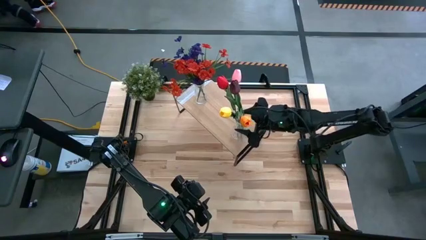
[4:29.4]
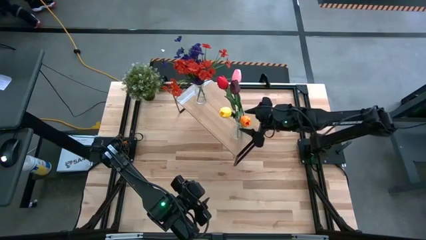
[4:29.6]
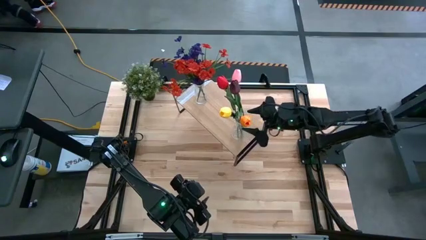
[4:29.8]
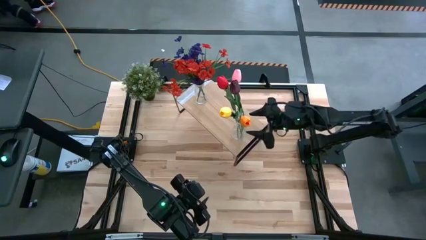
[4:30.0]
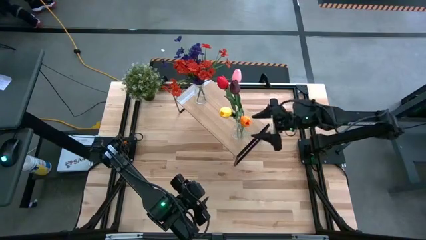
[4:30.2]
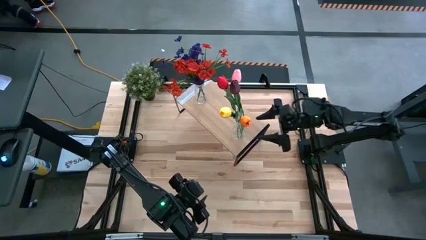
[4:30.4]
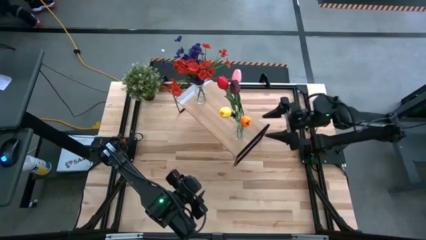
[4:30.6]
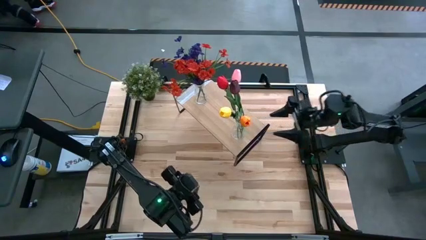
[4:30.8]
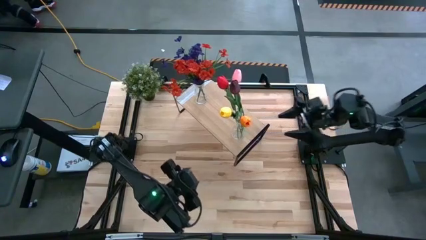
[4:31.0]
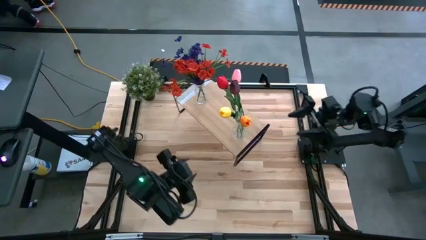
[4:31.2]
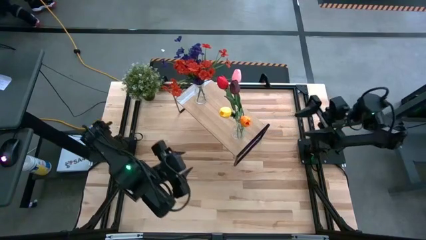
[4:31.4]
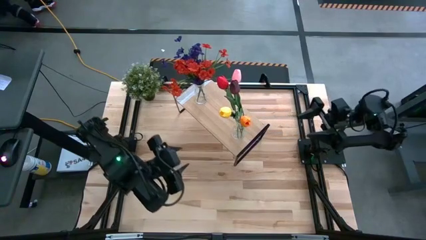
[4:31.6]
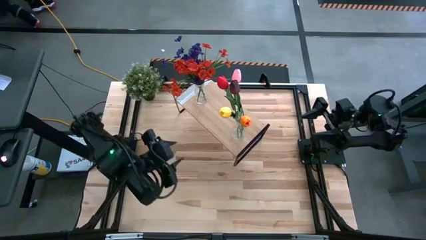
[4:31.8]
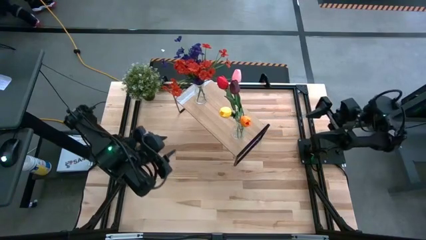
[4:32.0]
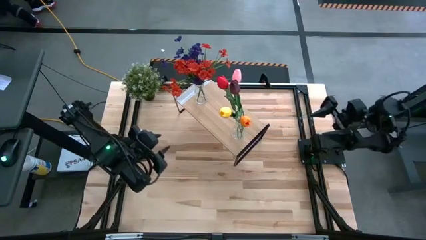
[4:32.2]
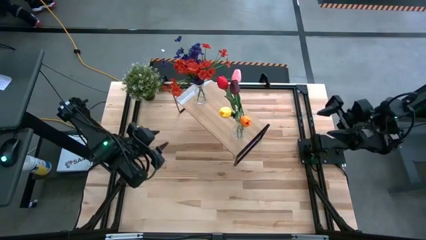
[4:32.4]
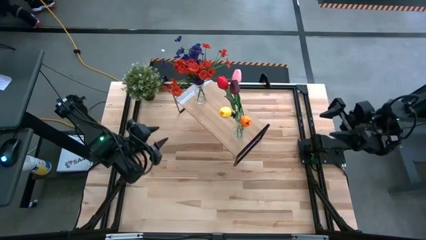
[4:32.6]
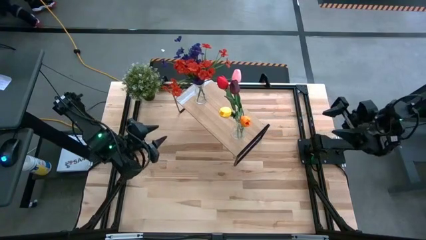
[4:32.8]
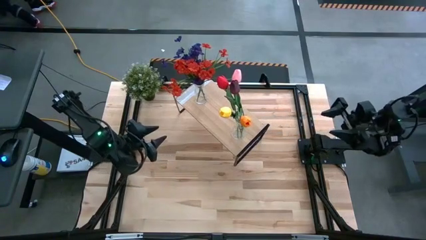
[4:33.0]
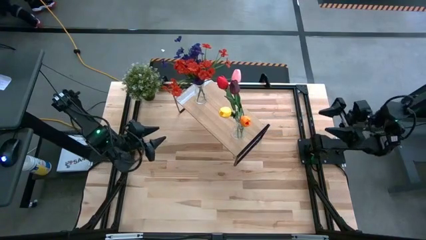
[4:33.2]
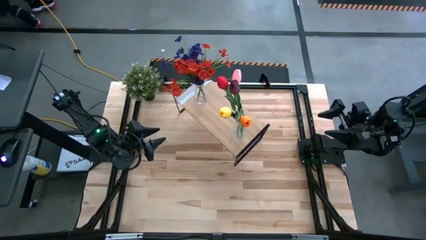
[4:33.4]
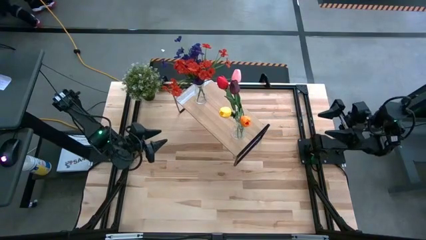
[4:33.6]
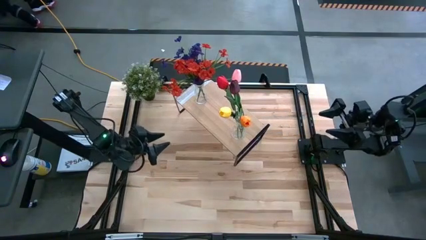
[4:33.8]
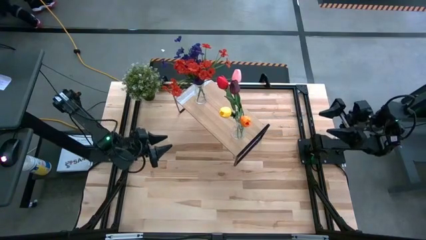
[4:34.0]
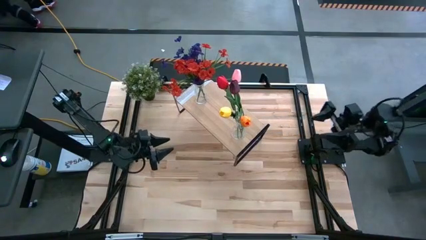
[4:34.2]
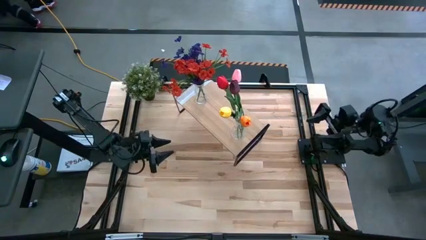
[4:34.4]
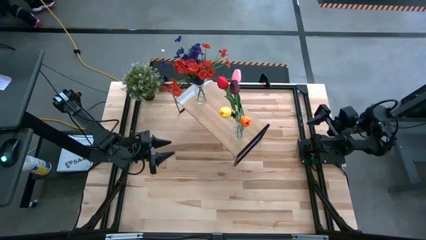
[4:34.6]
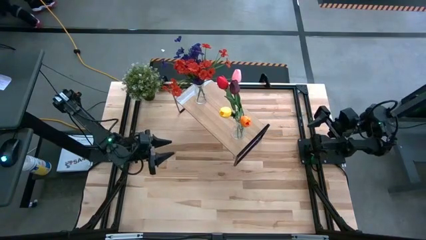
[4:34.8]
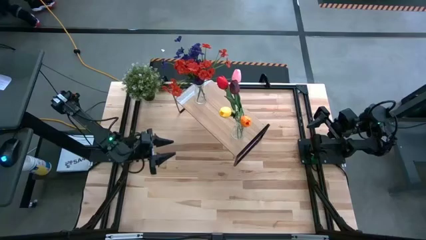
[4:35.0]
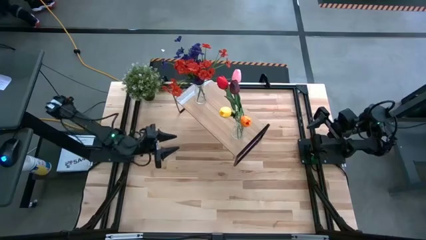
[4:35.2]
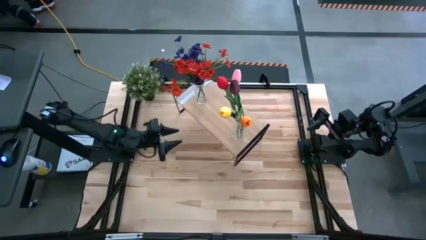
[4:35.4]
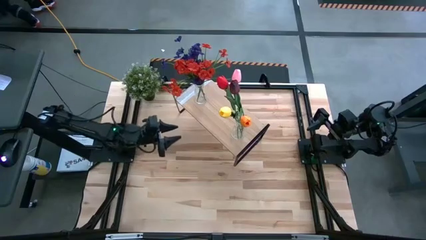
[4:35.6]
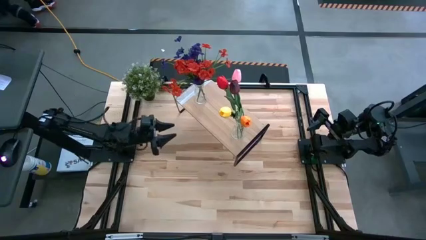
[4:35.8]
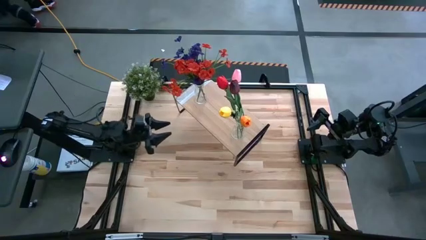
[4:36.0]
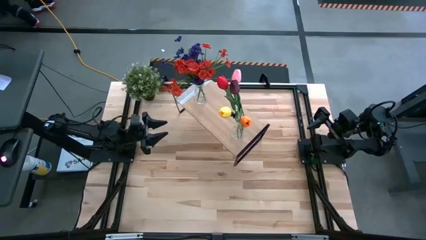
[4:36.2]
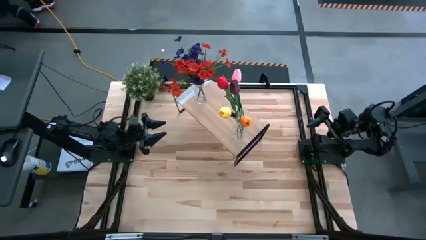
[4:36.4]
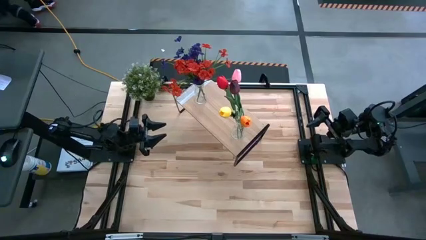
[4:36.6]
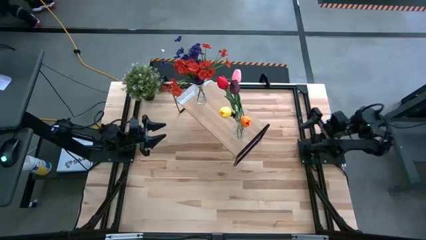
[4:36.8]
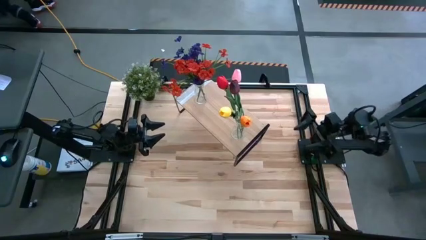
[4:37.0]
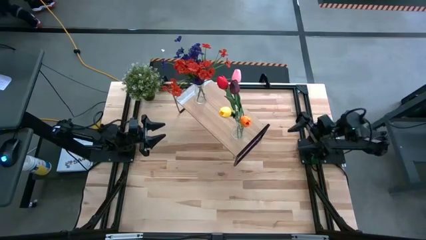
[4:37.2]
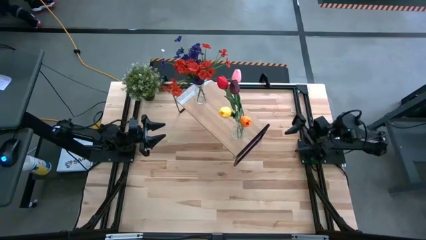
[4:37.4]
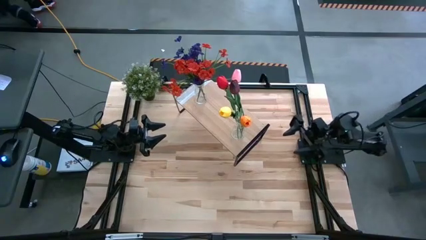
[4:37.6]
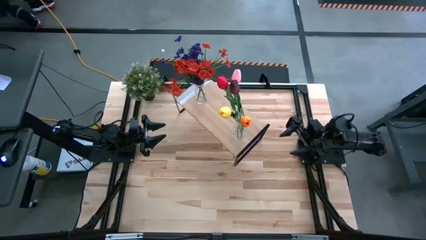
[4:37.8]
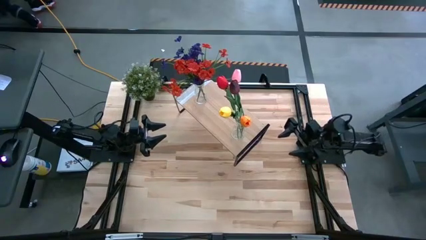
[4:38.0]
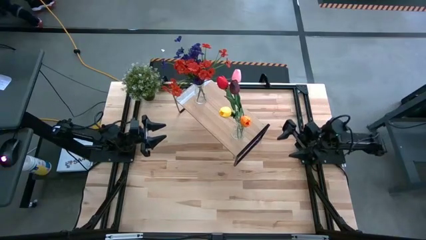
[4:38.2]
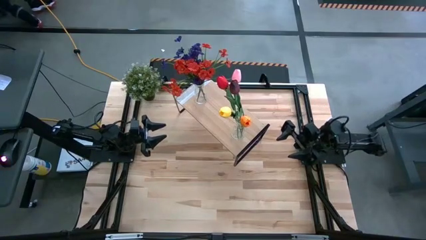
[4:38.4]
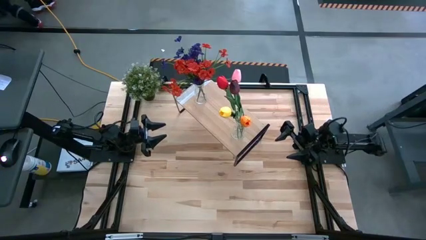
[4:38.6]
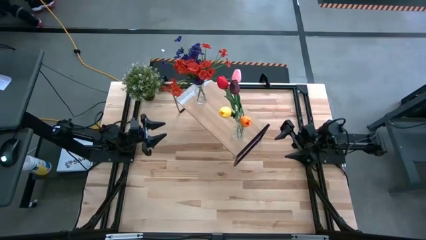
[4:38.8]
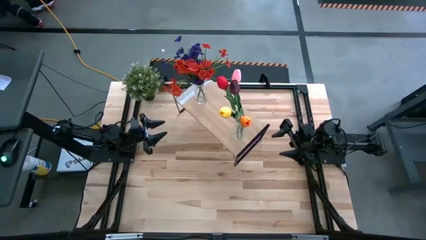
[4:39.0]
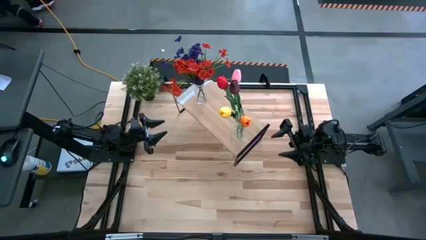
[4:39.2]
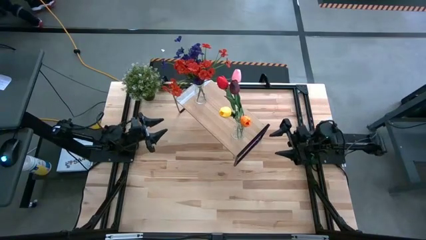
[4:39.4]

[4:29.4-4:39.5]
Task: Pick and place flowers into a vace then onto a shelf
Return to Home Position

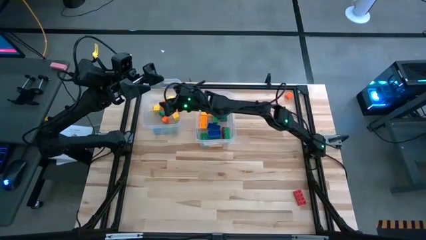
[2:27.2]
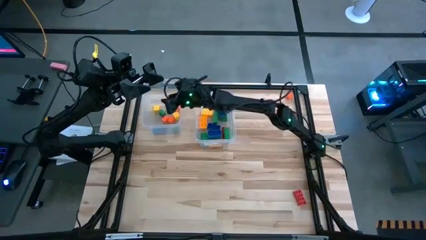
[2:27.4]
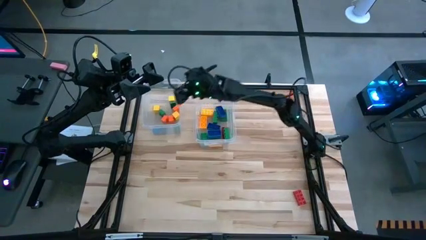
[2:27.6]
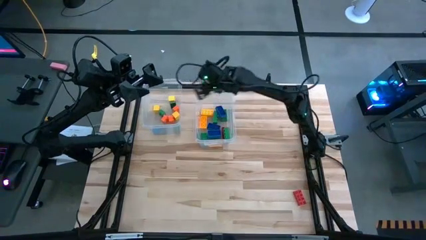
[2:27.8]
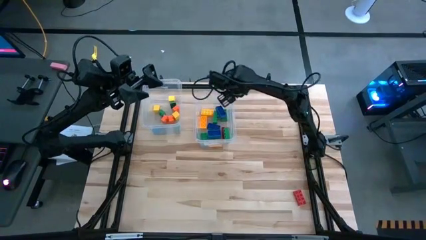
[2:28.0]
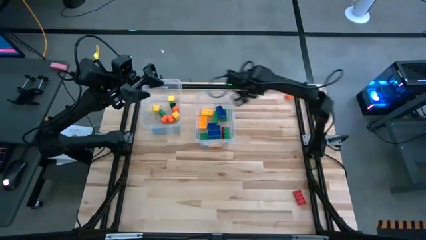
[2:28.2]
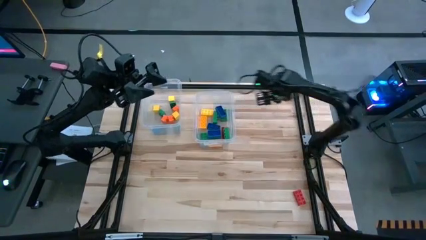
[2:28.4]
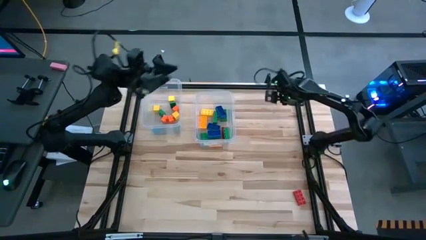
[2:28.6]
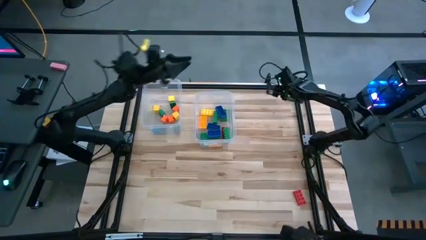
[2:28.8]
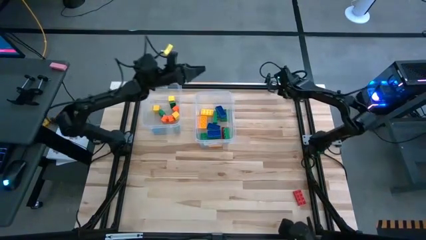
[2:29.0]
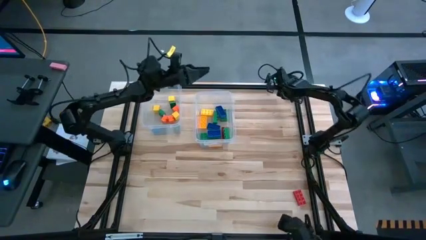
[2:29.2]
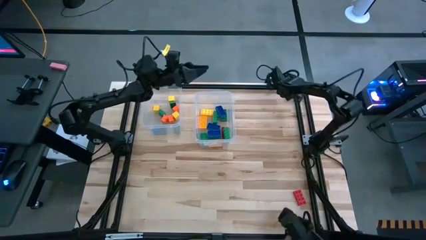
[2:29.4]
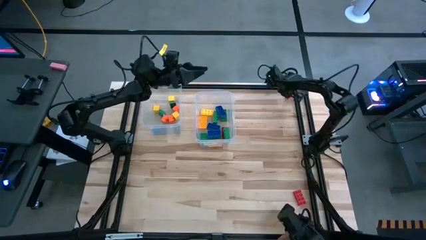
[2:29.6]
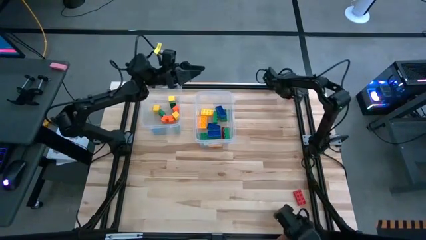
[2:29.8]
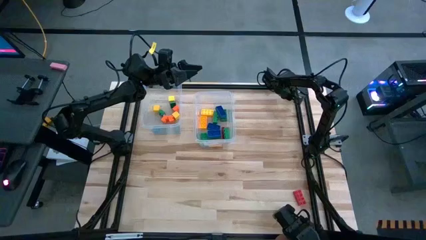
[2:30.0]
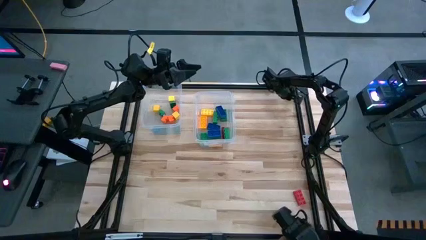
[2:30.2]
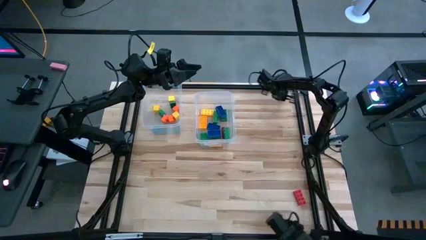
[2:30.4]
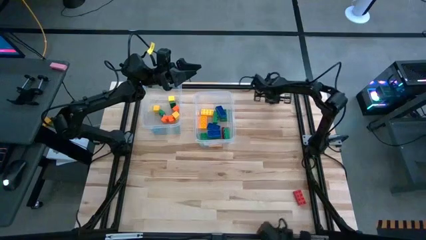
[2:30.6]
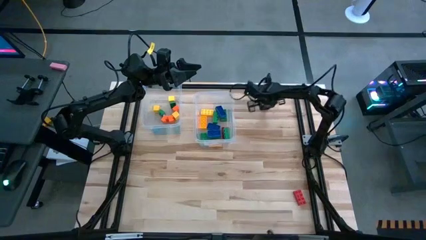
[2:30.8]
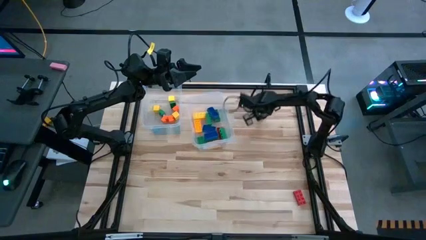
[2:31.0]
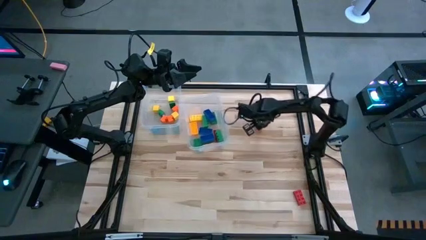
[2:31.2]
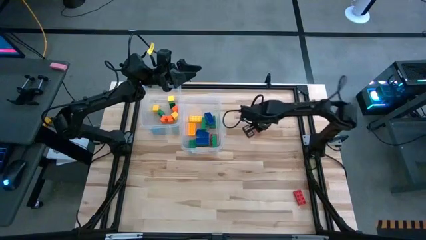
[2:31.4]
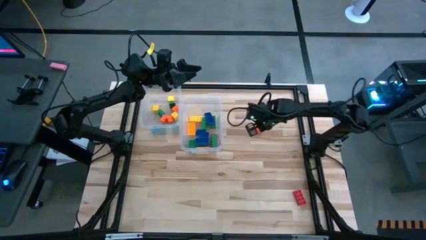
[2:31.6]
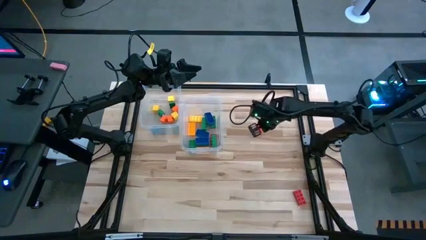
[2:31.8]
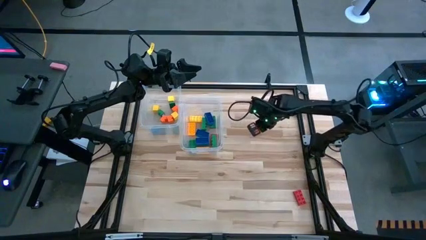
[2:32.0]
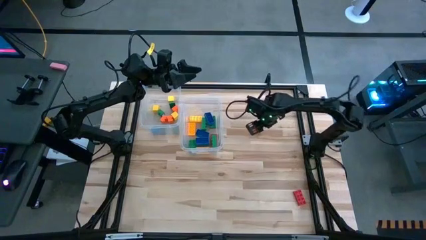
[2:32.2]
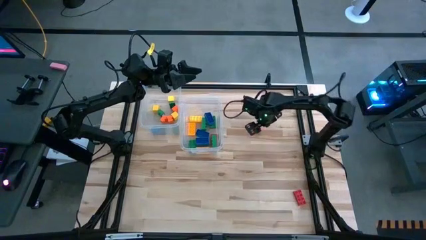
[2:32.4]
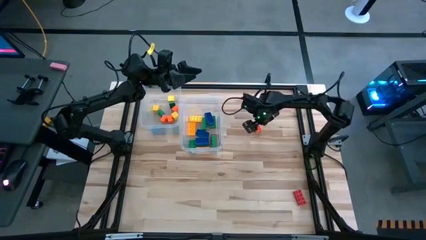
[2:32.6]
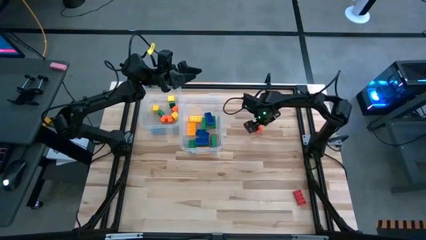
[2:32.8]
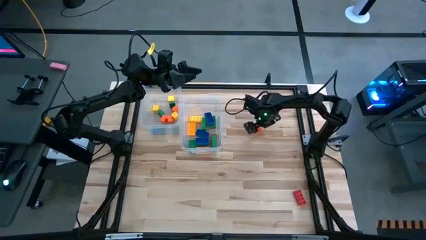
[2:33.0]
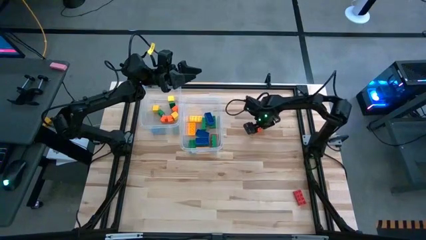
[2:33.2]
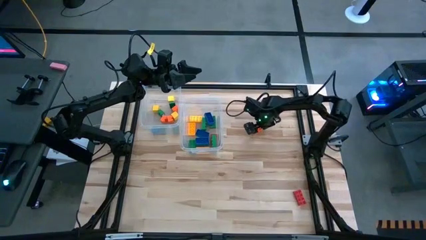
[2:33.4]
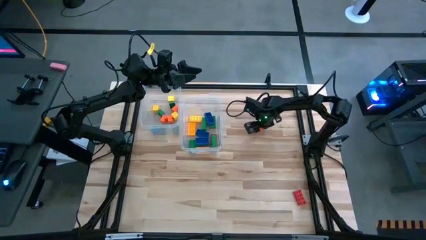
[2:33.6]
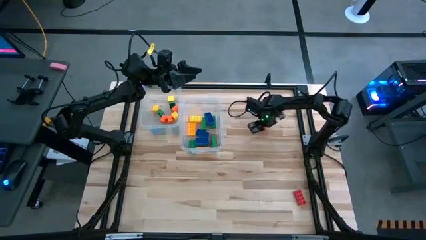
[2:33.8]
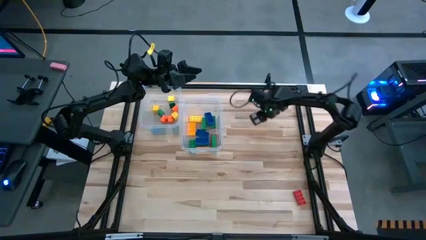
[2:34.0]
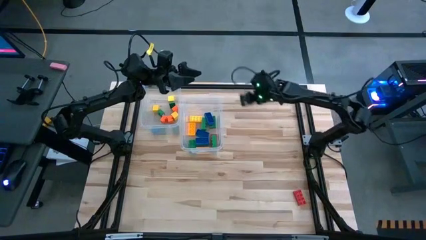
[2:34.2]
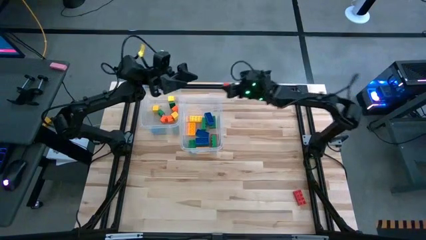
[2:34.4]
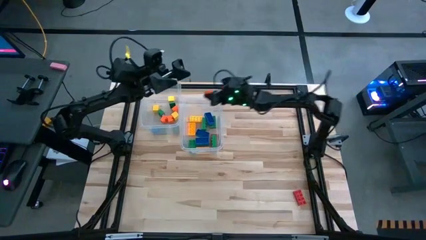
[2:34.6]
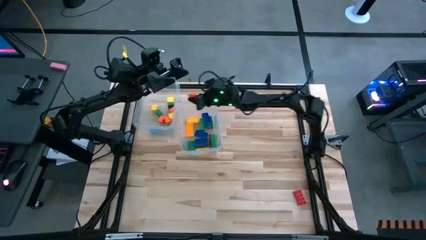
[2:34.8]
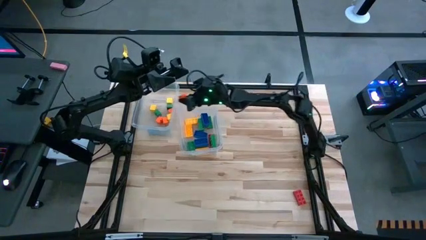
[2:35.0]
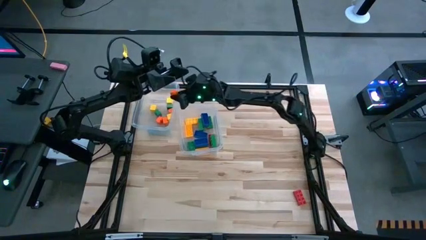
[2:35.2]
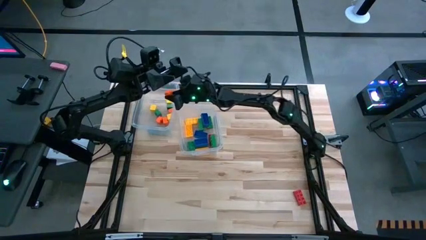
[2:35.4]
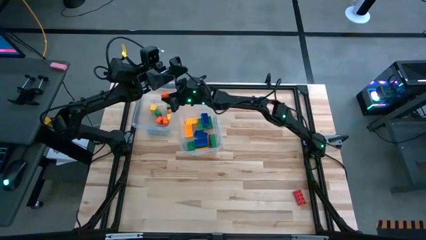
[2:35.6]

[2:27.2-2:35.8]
Task: Sort blocks by size
Put the orange small game piece into the left transparent bin
